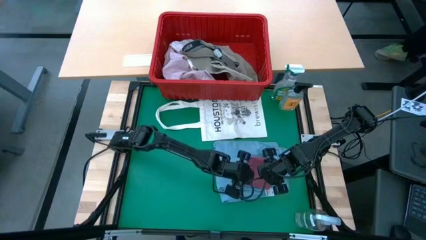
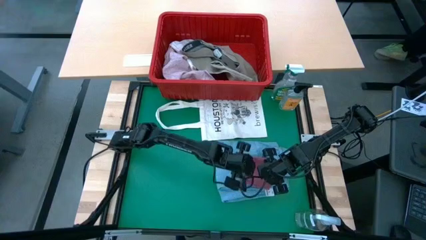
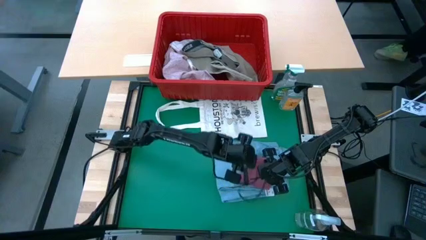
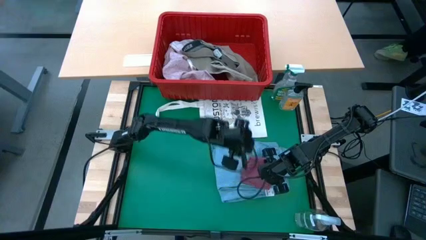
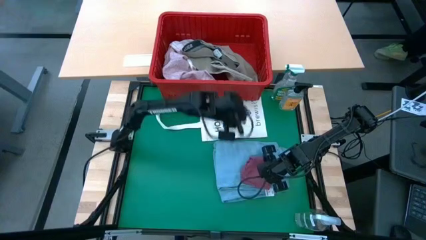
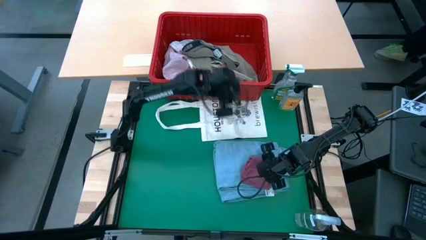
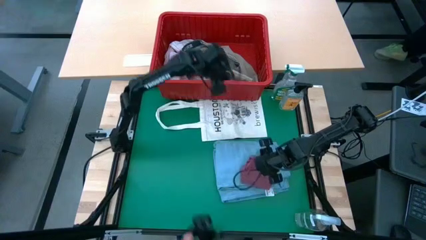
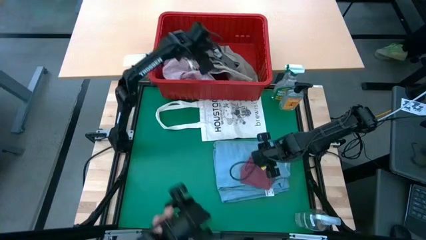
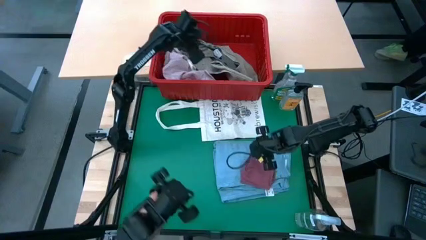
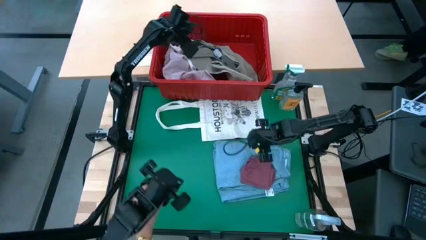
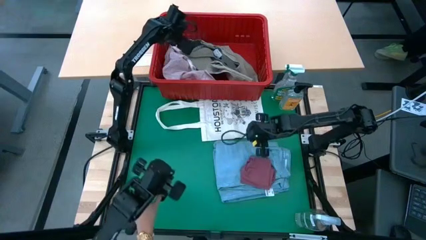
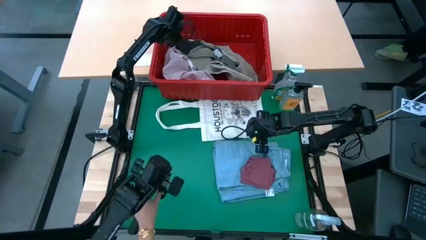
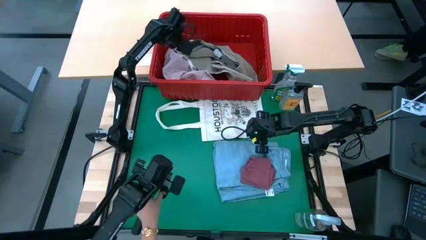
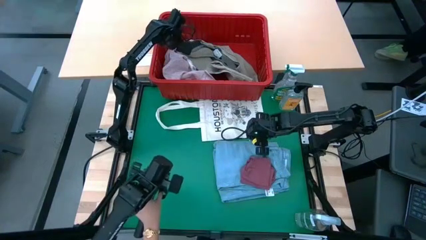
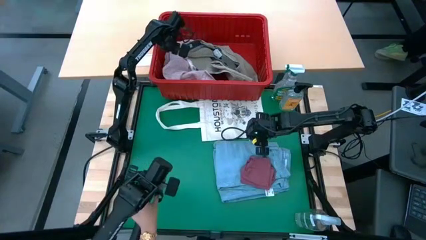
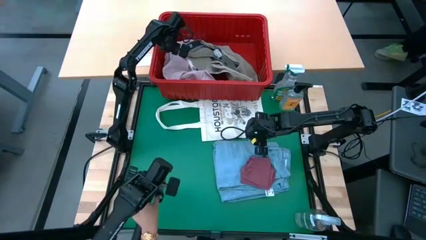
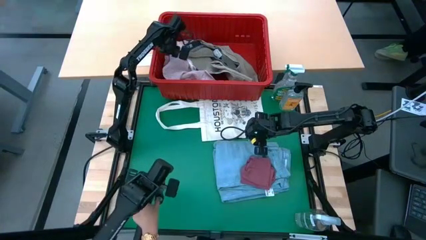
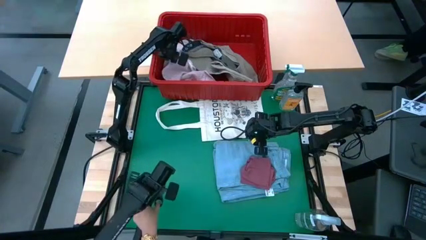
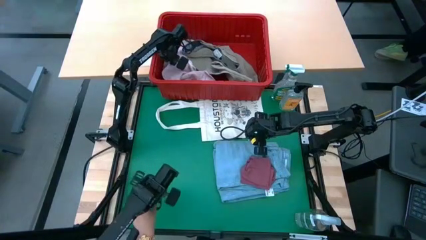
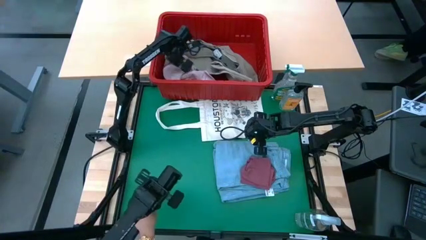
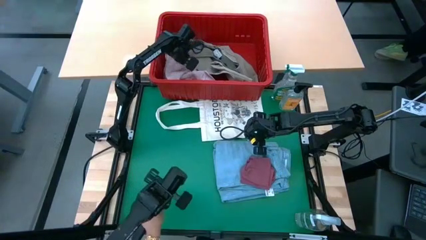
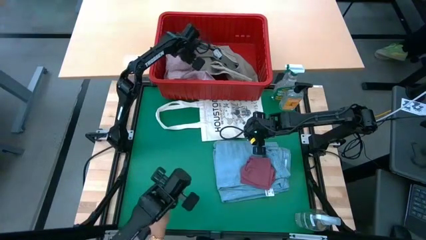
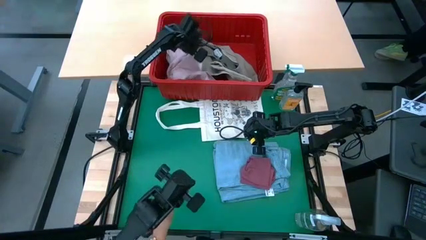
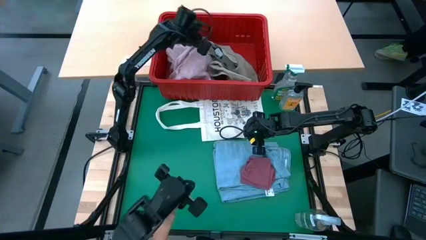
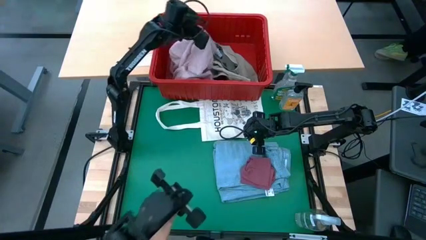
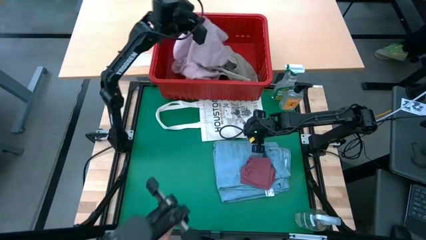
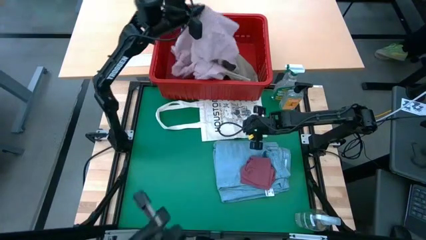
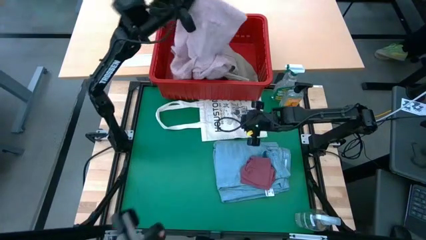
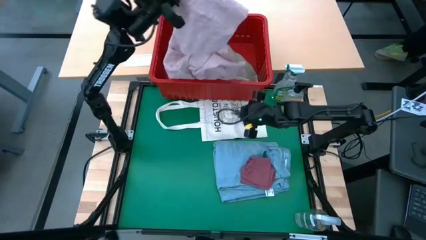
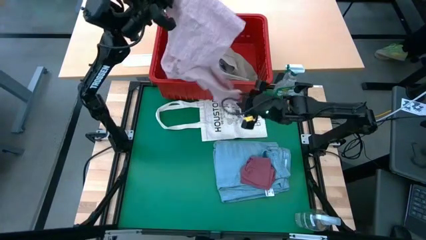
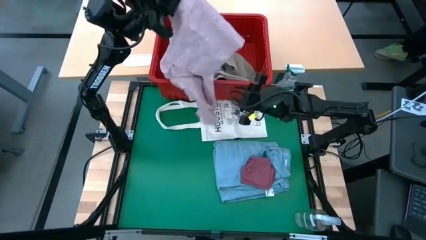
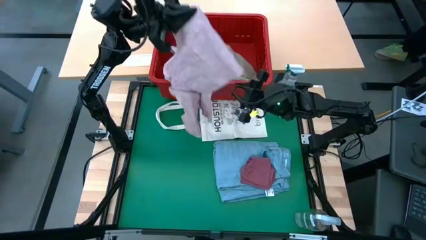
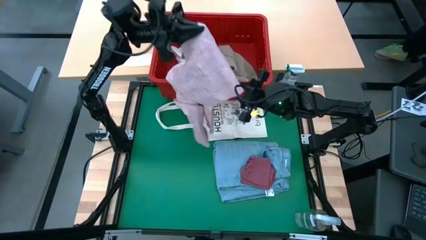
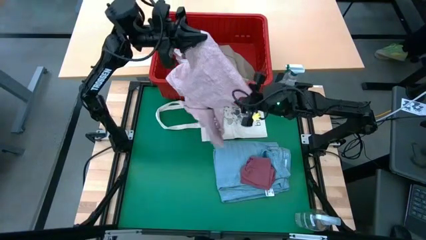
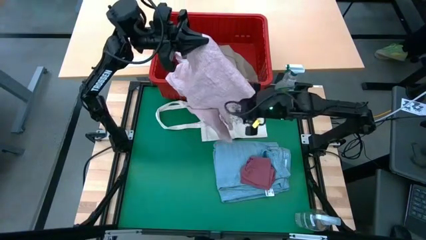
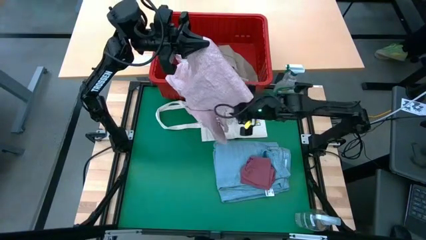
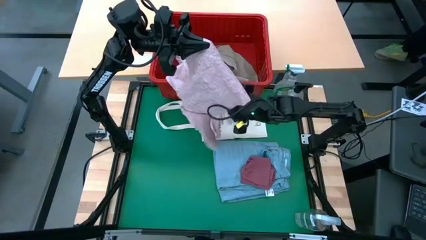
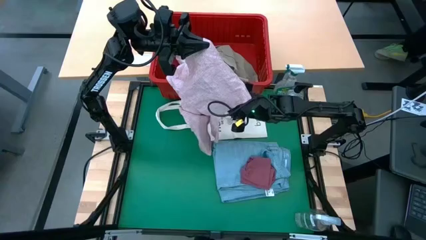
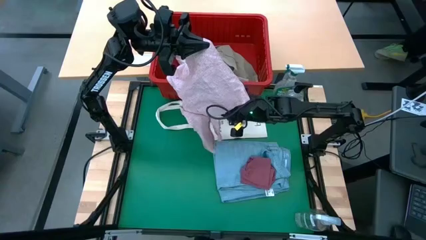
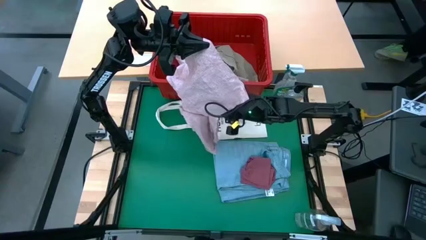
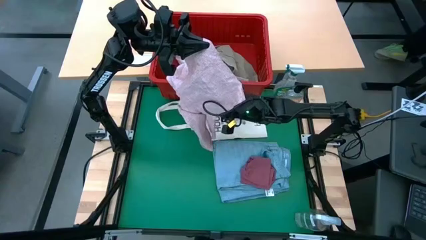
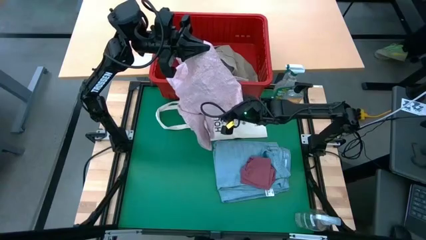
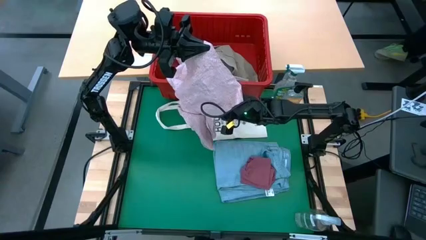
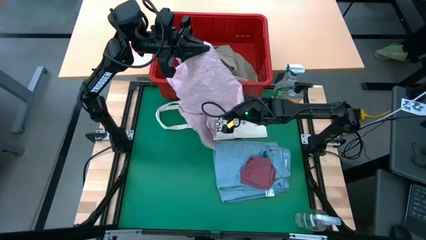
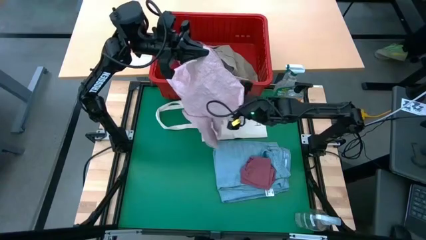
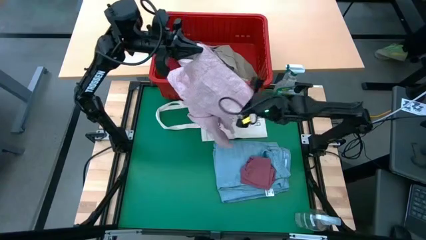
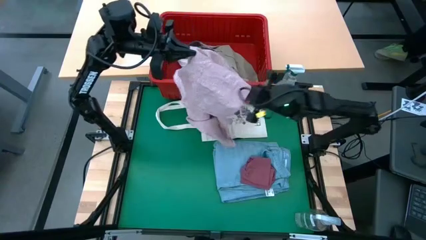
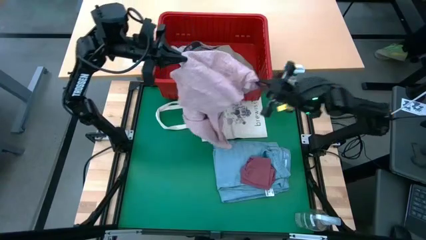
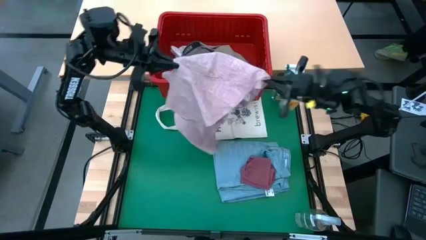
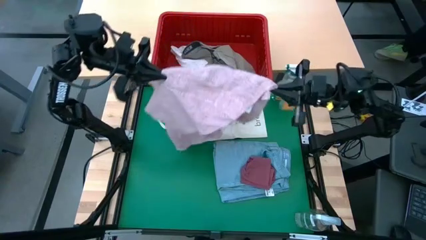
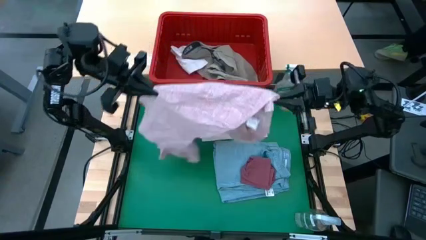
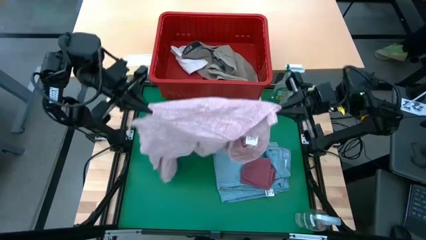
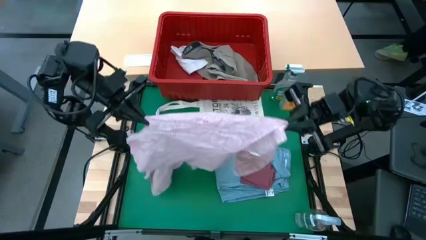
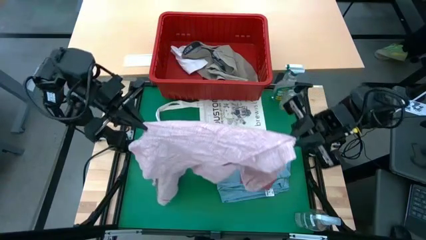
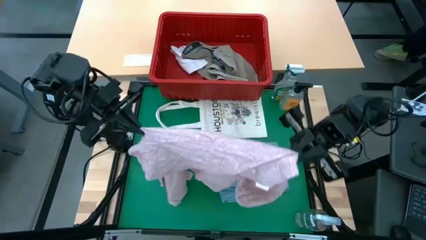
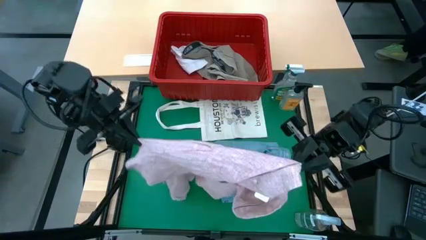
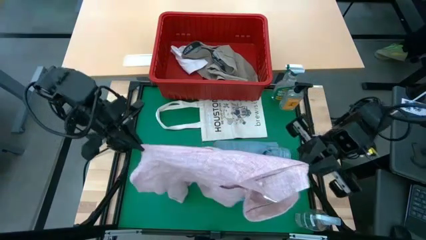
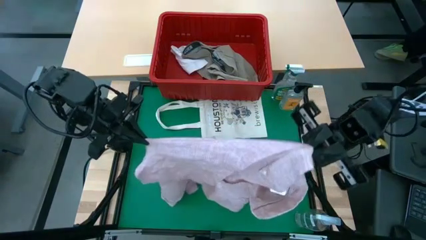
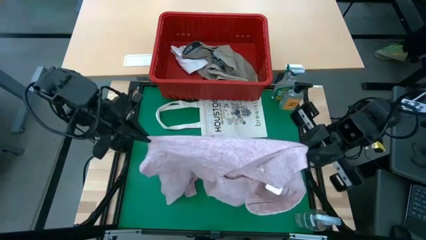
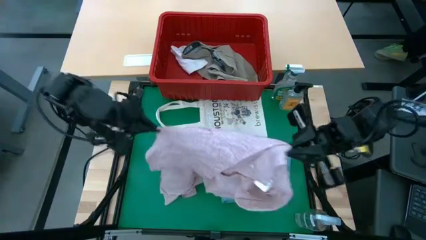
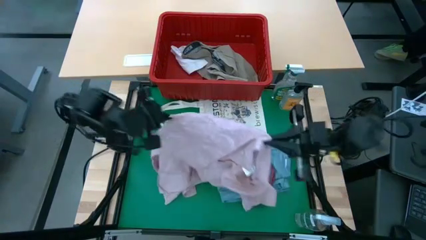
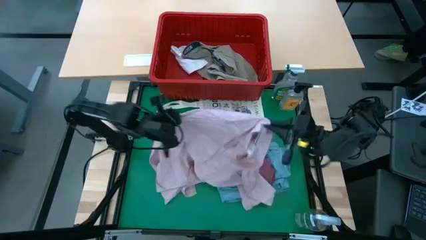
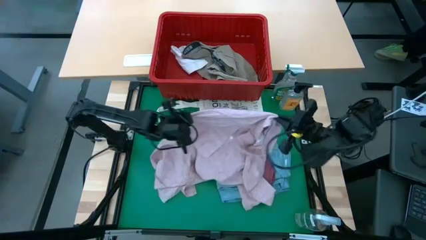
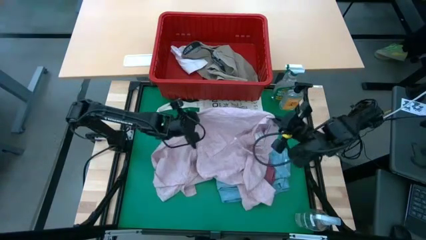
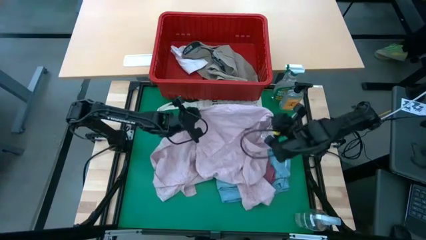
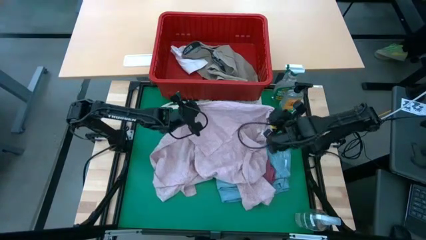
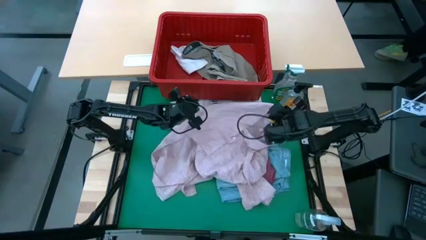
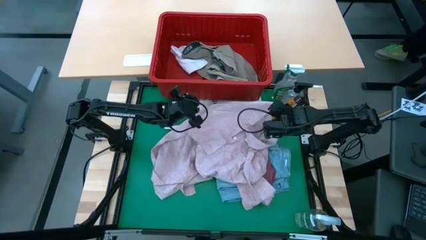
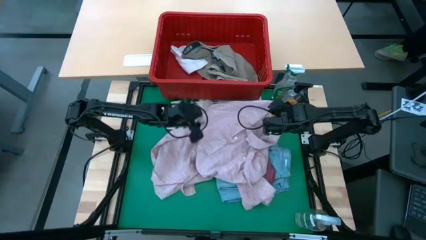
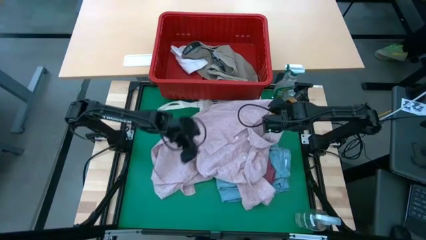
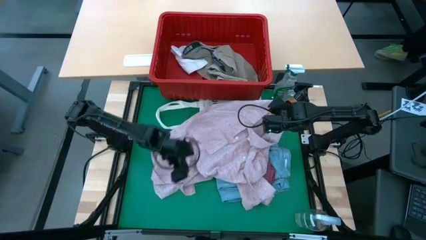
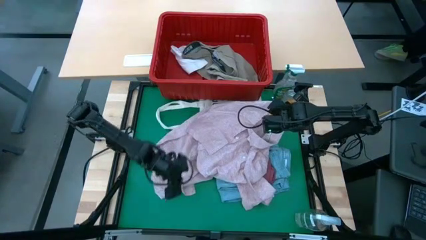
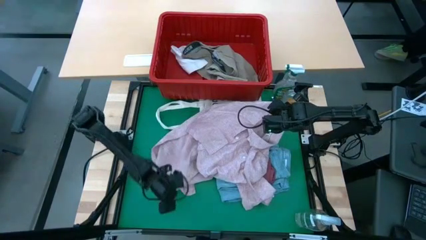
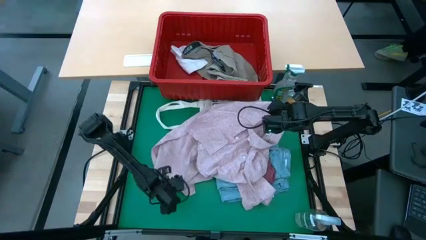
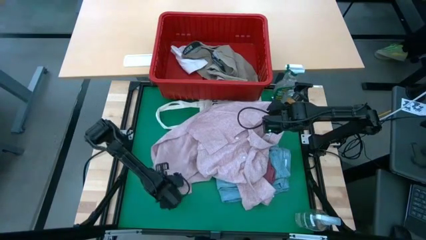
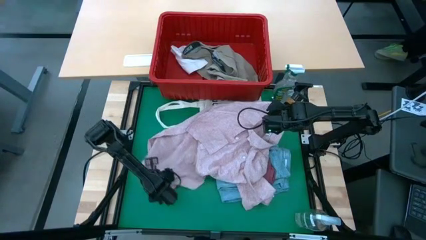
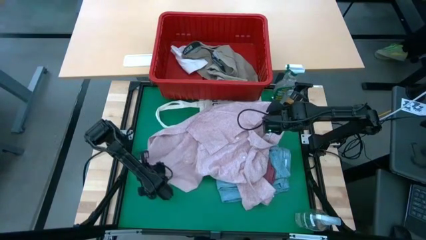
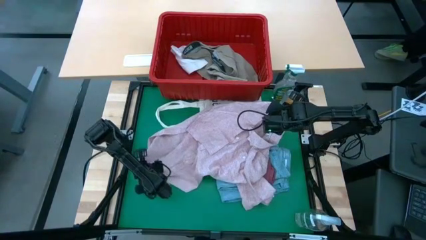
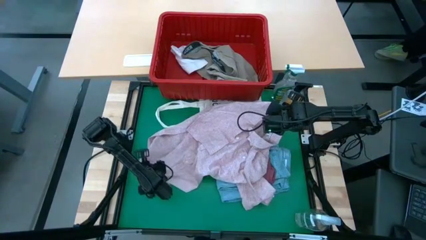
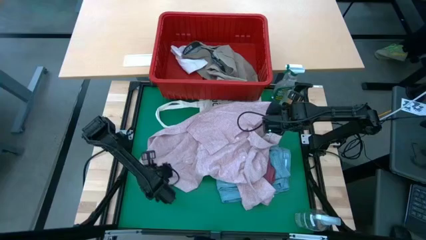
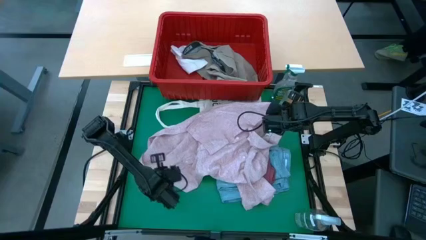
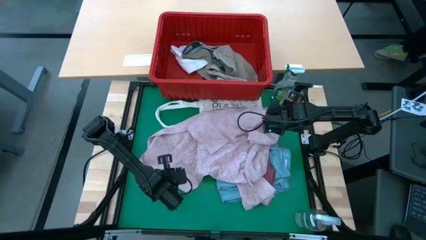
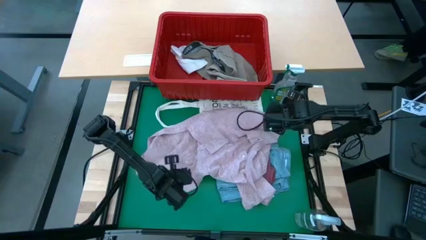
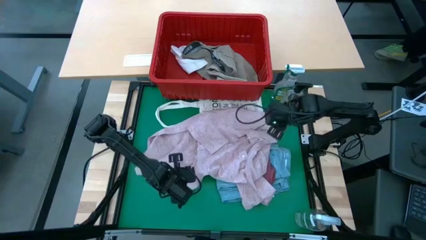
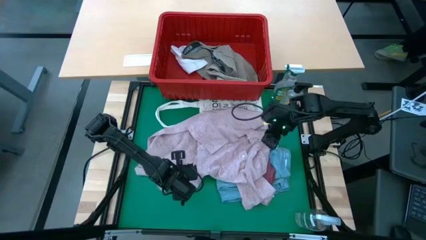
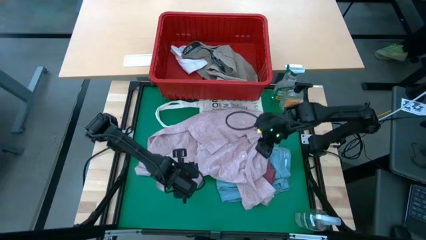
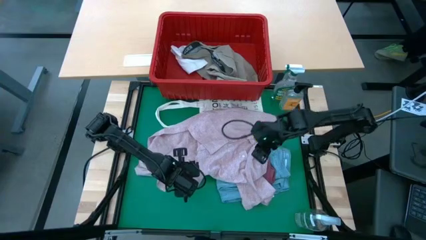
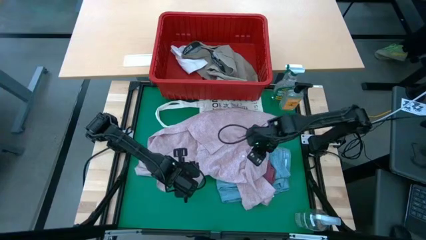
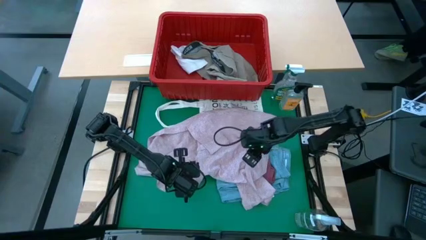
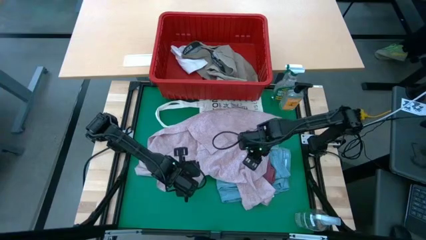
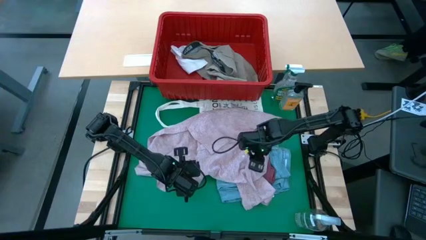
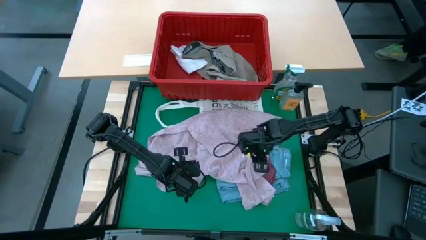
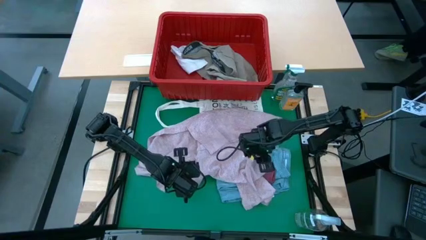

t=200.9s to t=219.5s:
Task: Fold Laundry from Bin
Fold the pink shirt from the red laundry basket
